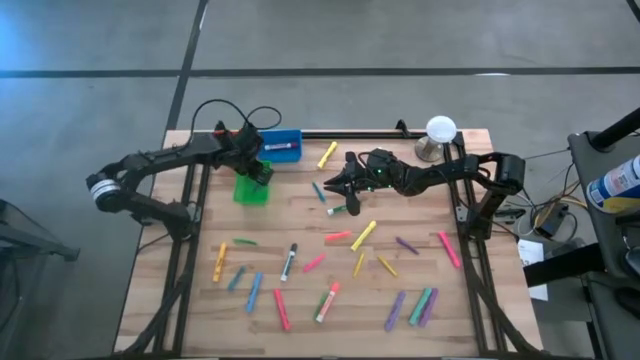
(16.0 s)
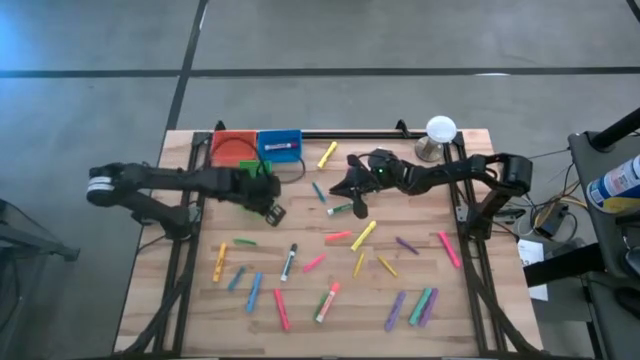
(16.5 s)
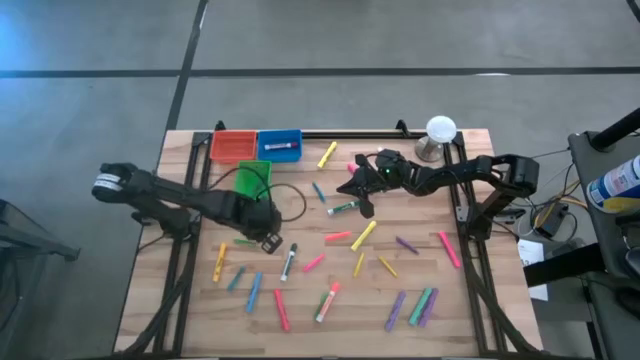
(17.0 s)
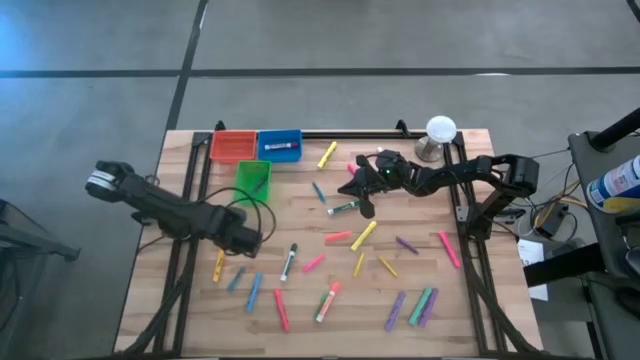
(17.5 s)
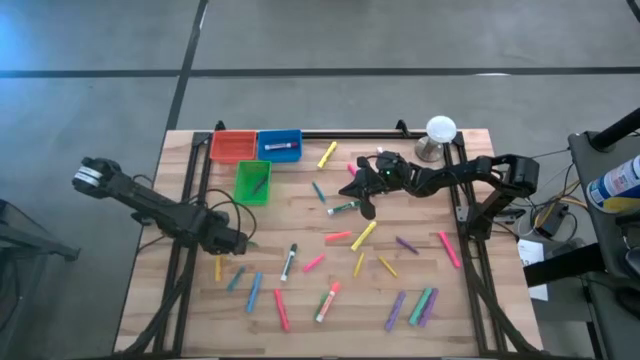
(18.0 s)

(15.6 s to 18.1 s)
Task: Pick & Place Markers
Put the yellow highlighter into the orange bin

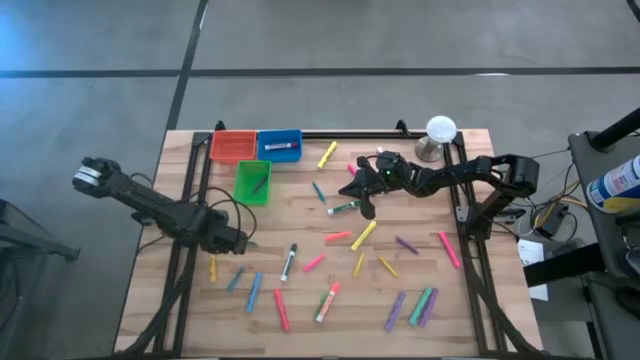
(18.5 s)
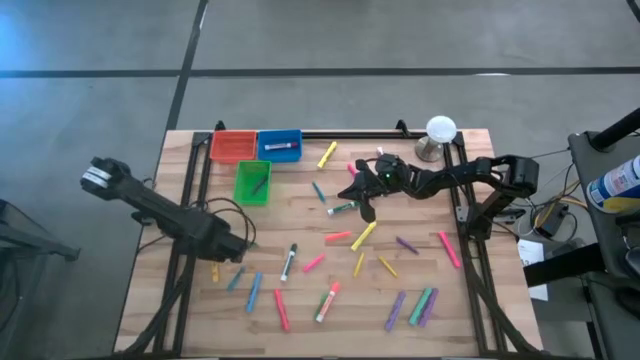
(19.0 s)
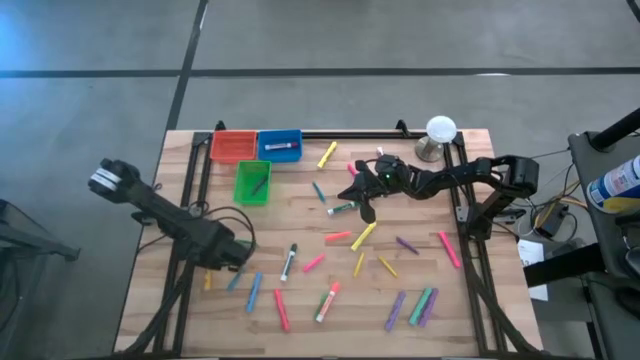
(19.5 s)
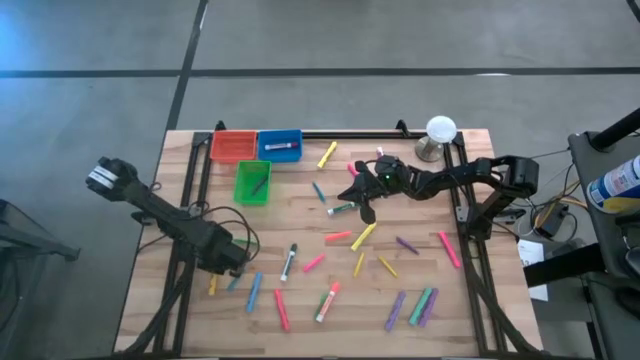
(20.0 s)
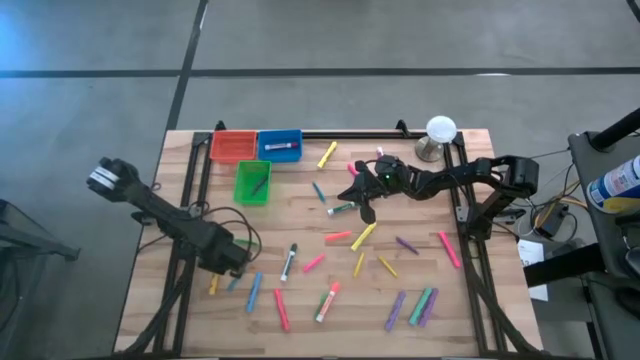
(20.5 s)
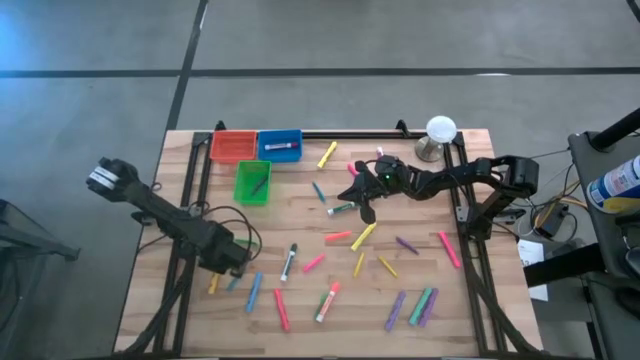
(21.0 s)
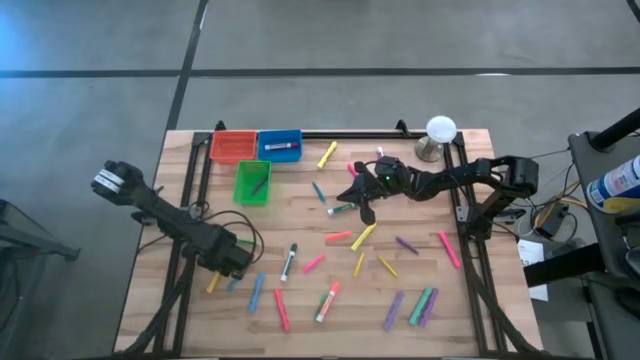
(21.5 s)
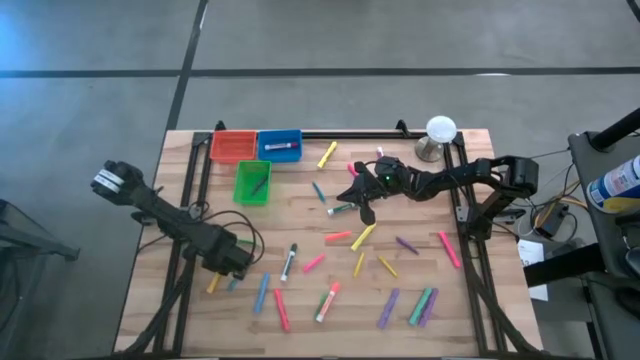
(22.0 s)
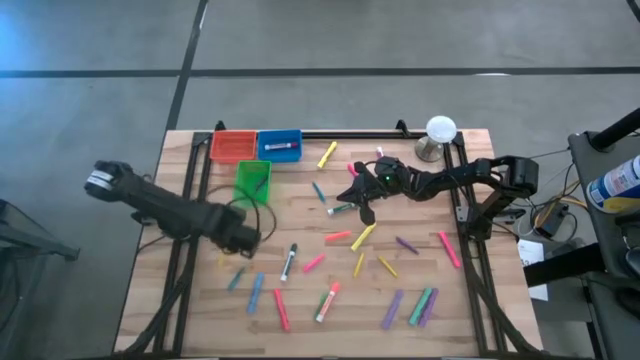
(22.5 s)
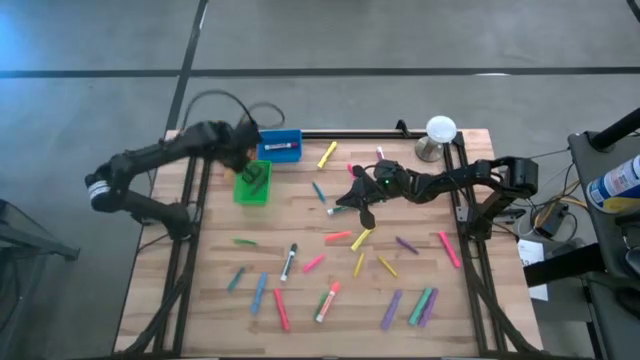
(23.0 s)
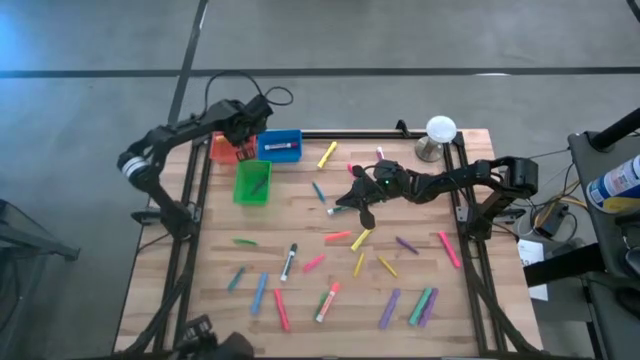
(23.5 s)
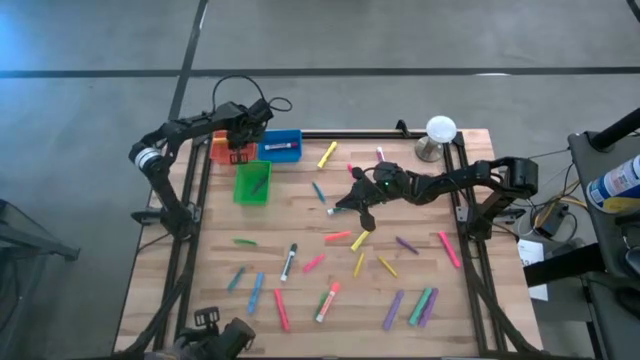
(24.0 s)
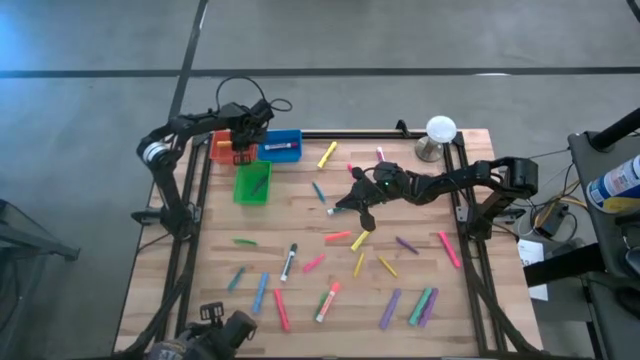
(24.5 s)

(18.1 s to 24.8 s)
Put the yellow highlighter into the orange bin

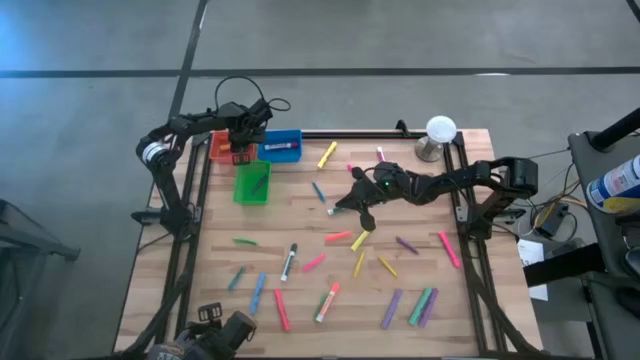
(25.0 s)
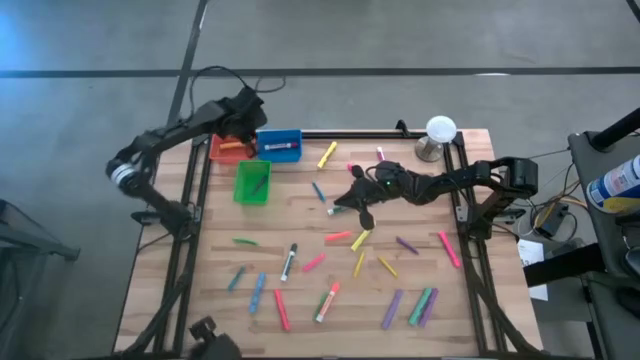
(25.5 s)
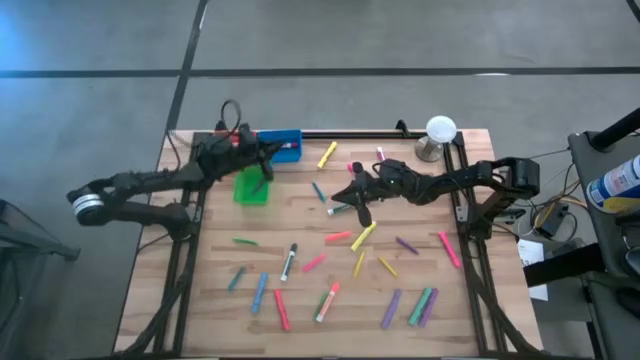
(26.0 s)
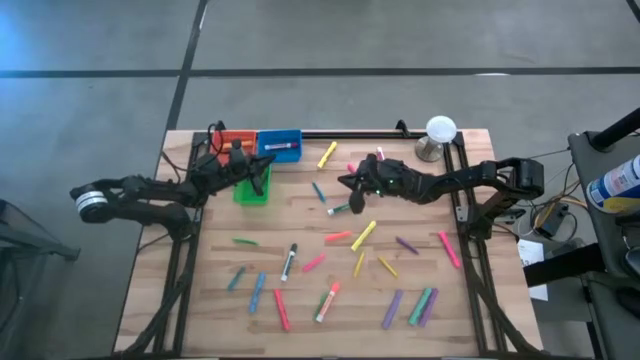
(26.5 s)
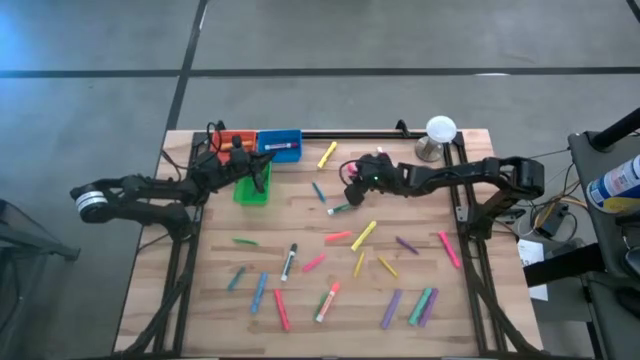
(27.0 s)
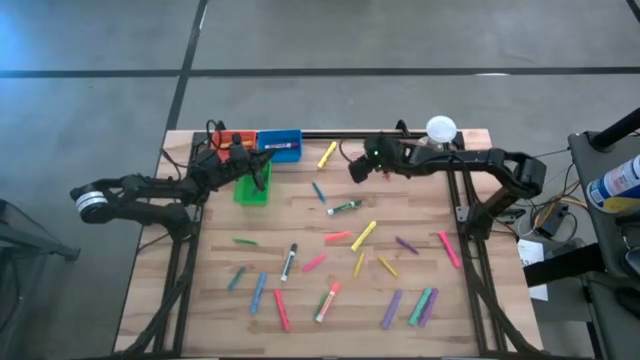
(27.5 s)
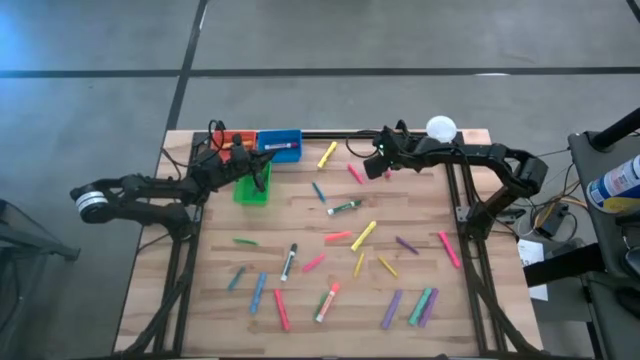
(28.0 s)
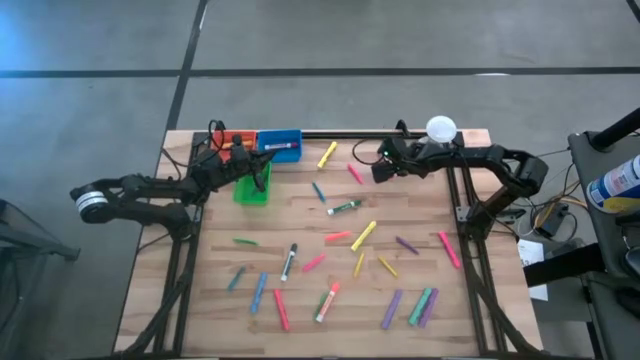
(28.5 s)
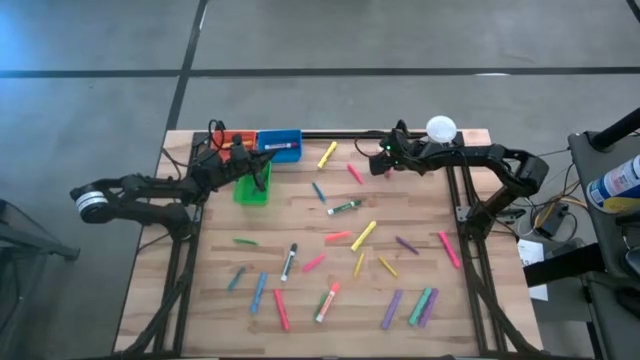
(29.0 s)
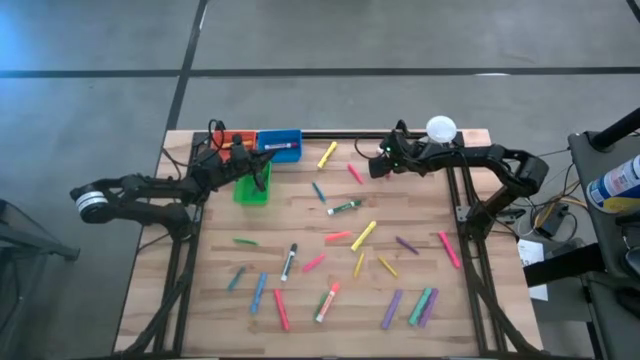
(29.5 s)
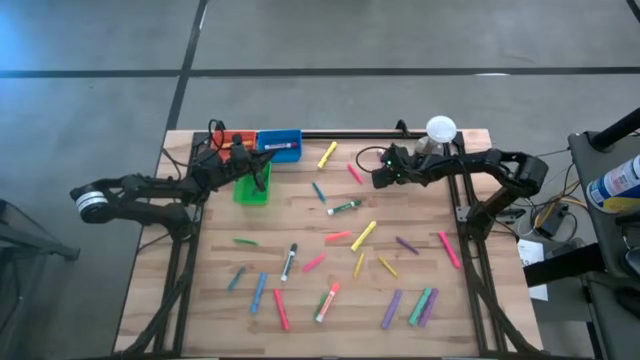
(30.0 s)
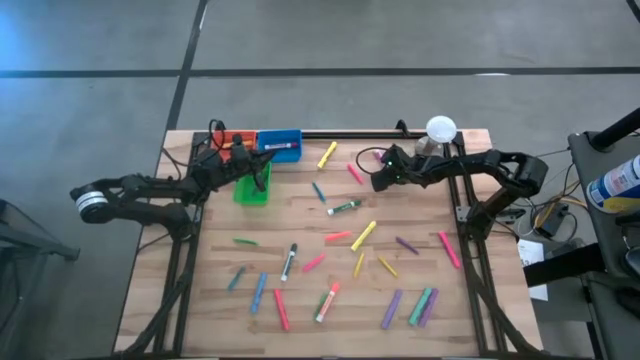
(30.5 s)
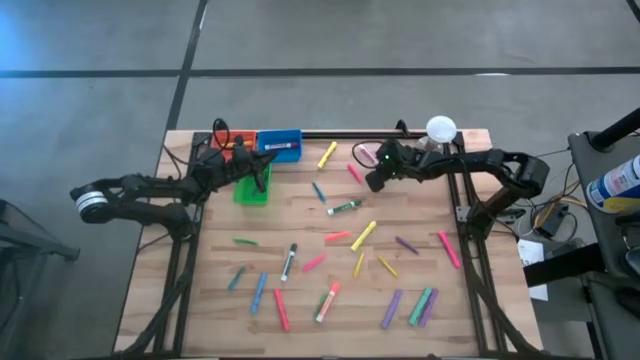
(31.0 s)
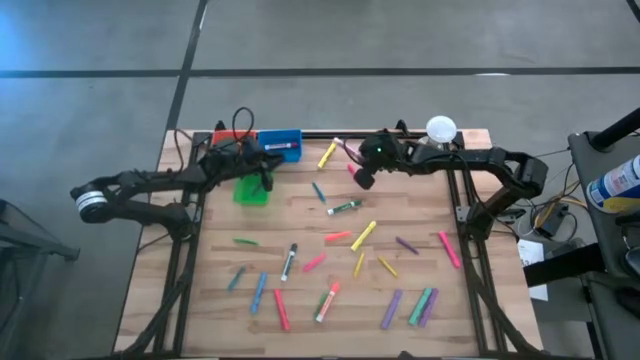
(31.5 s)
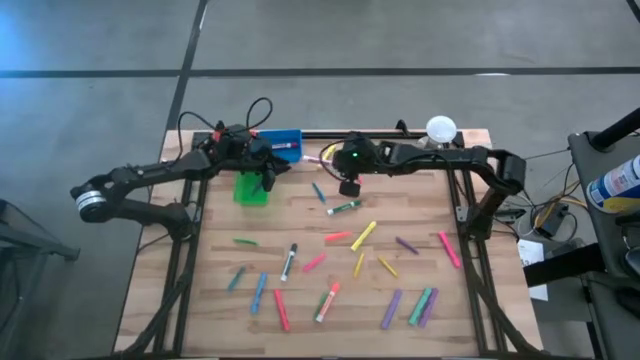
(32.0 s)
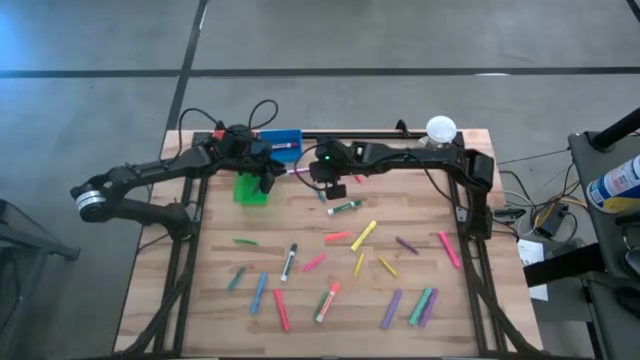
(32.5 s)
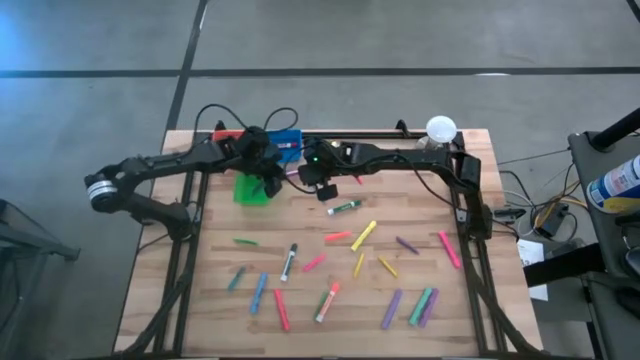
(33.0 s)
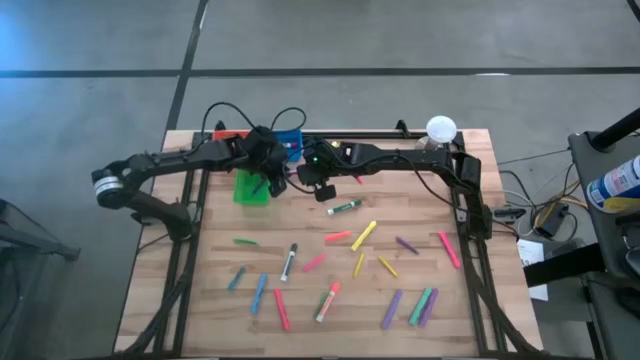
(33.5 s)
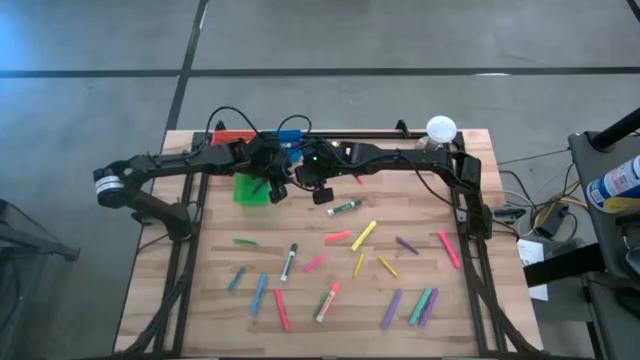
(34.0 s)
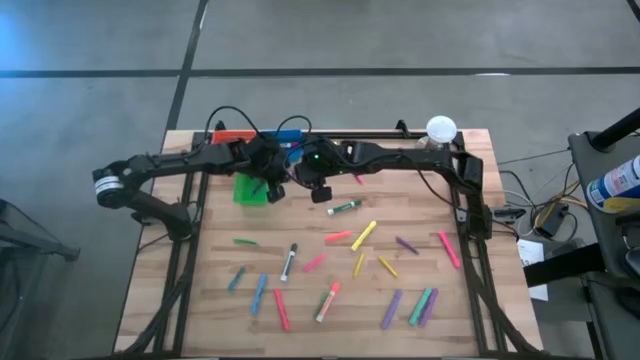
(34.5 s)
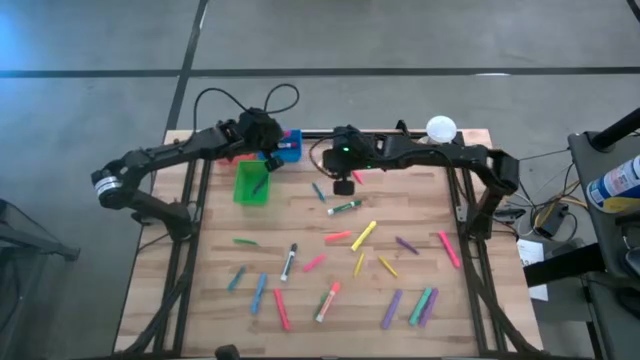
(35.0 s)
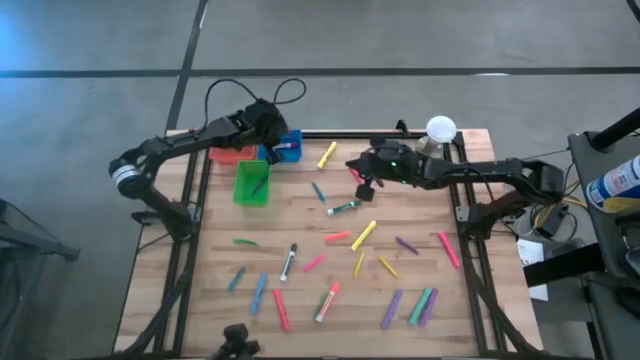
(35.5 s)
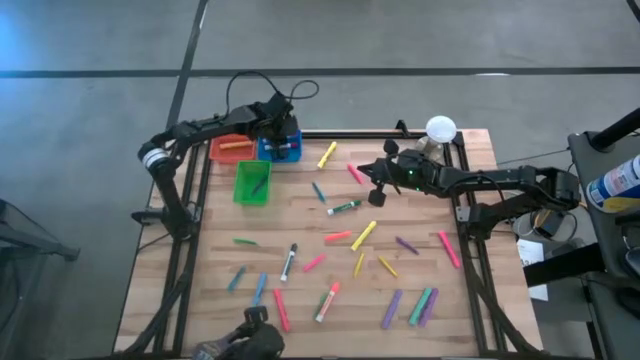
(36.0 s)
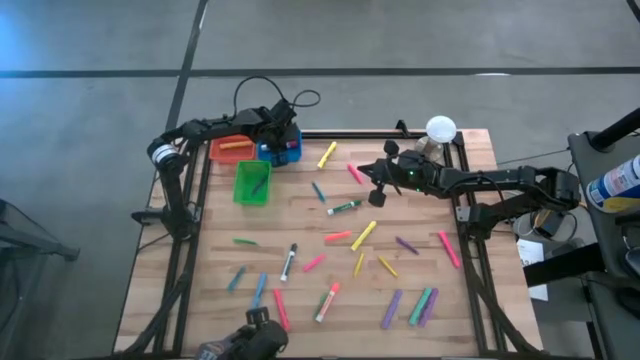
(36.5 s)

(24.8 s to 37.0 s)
Put the pink marker into the blue bin
